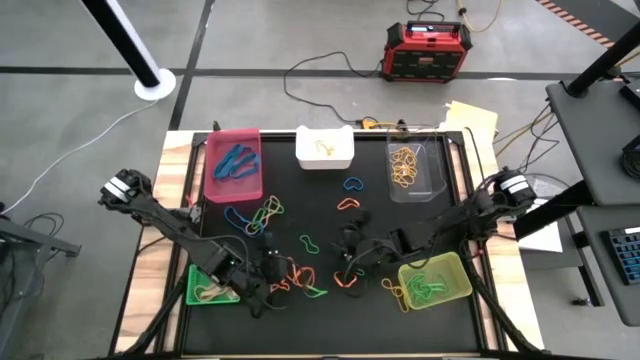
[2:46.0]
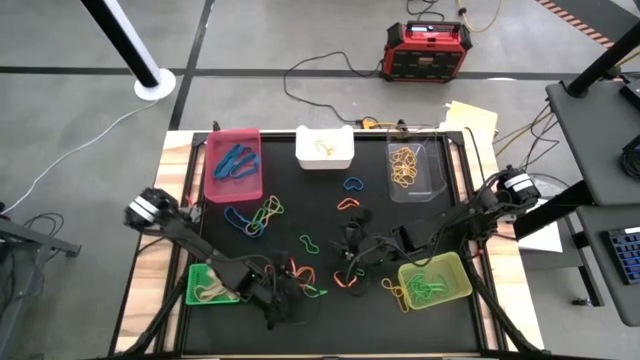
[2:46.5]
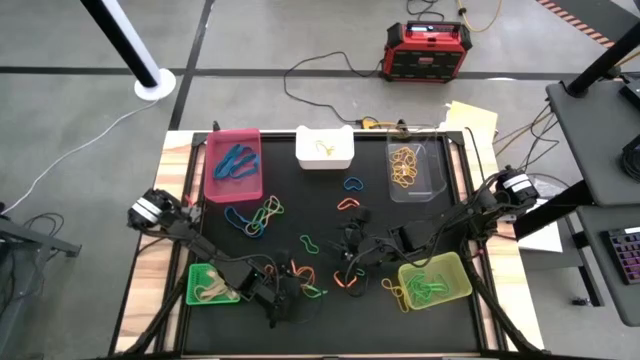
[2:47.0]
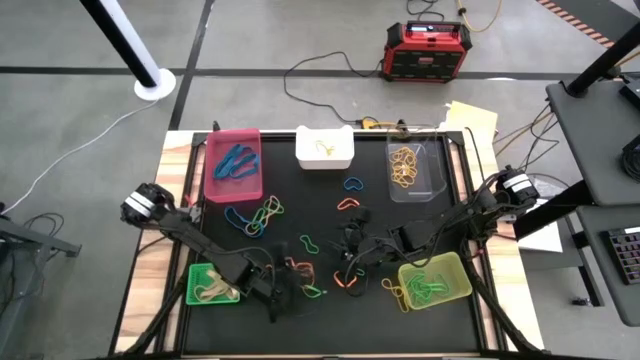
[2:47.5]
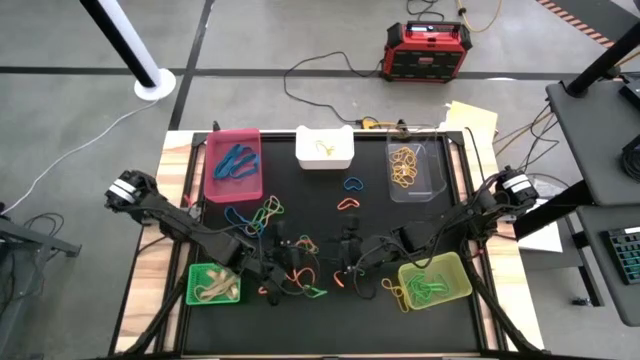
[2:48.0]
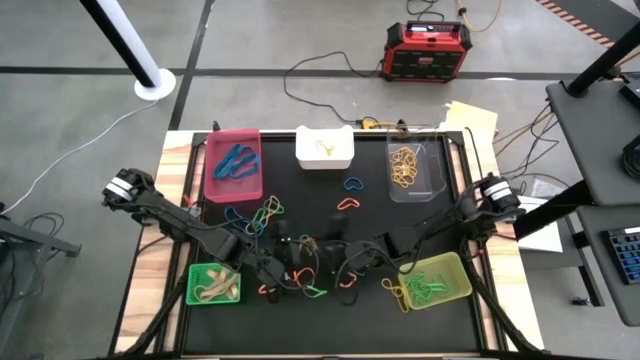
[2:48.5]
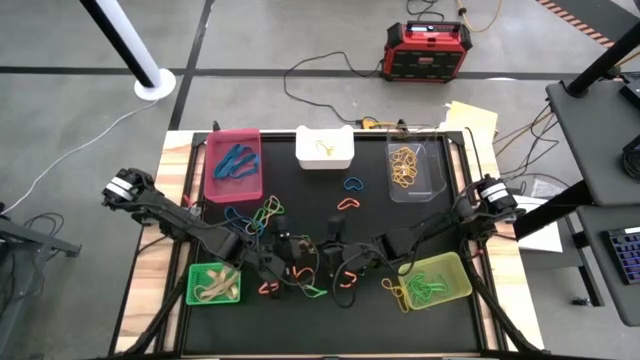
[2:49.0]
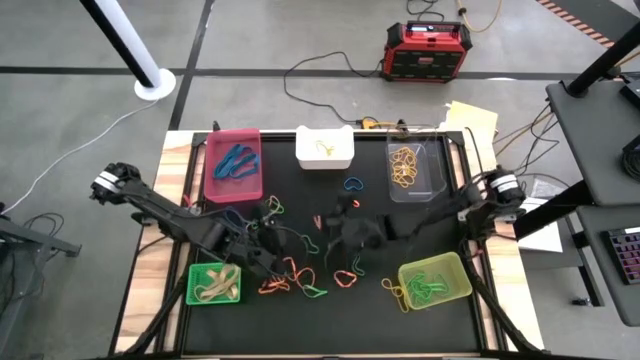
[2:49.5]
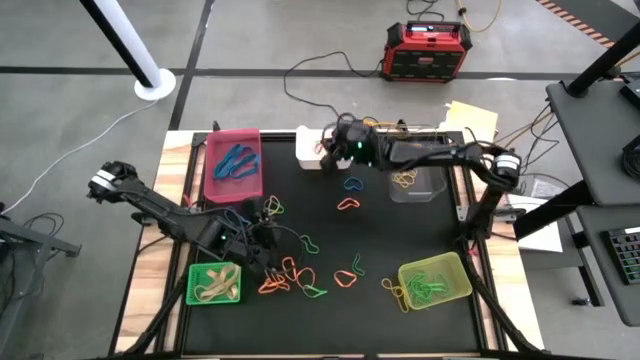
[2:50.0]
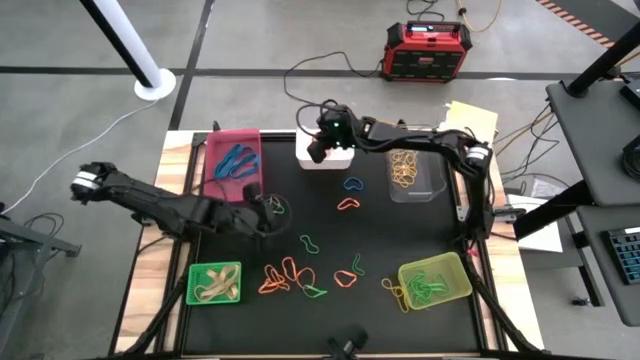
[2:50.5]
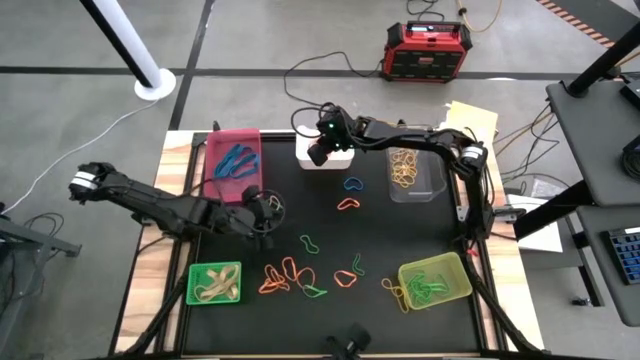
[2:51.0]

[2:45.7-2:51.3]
Task: Sort rubber bands into baskets
Put the orange rubber band into the white bin

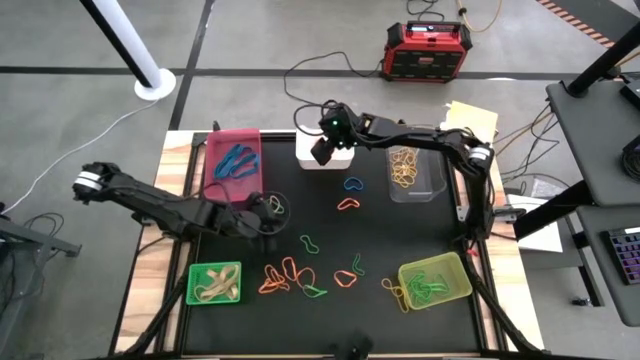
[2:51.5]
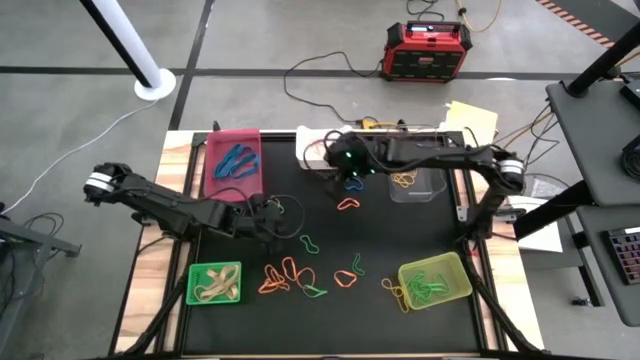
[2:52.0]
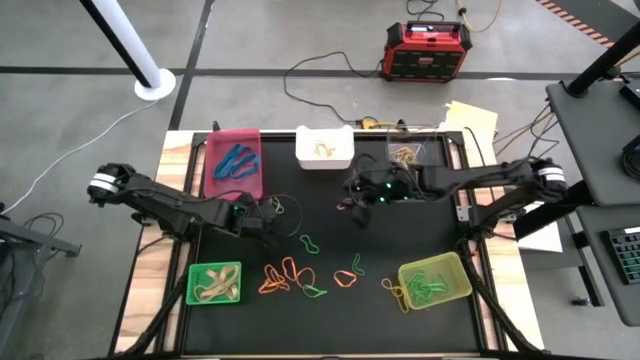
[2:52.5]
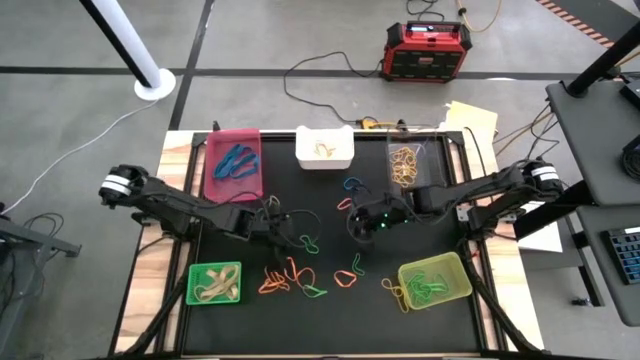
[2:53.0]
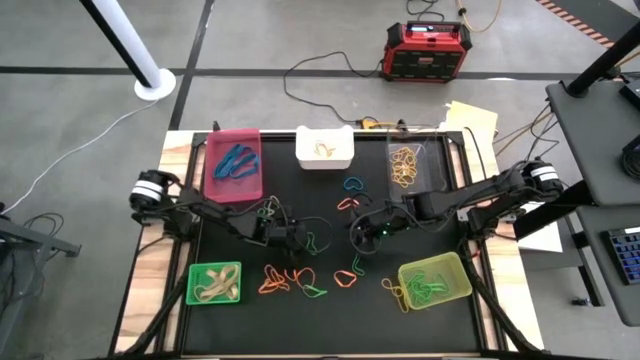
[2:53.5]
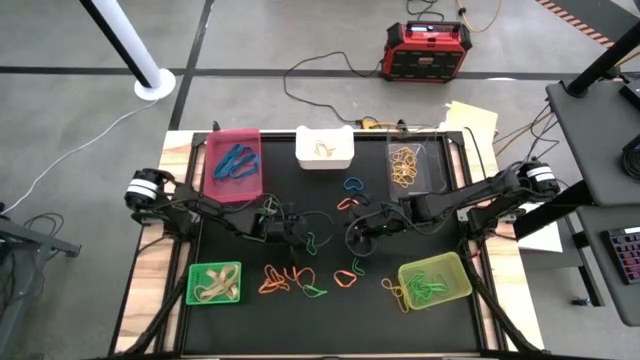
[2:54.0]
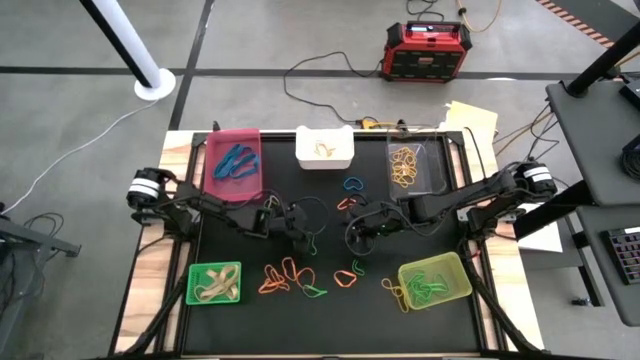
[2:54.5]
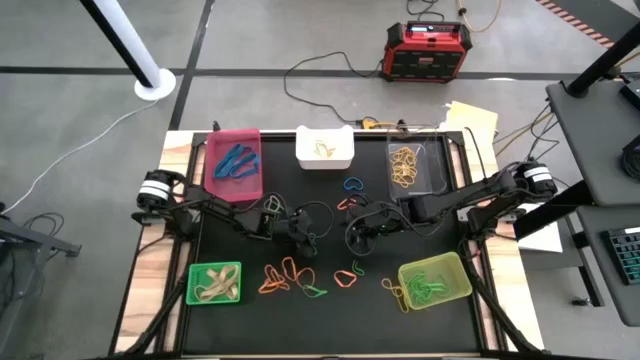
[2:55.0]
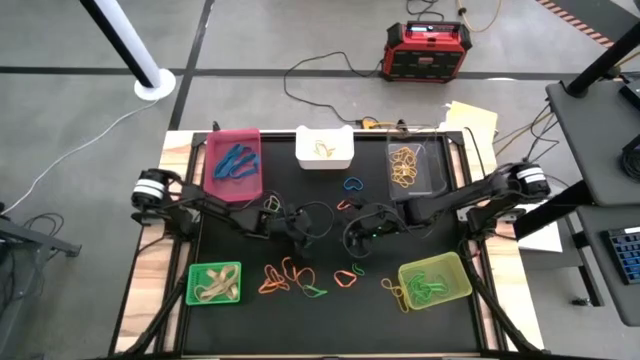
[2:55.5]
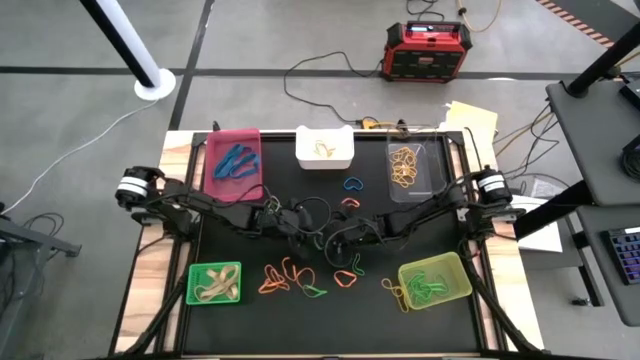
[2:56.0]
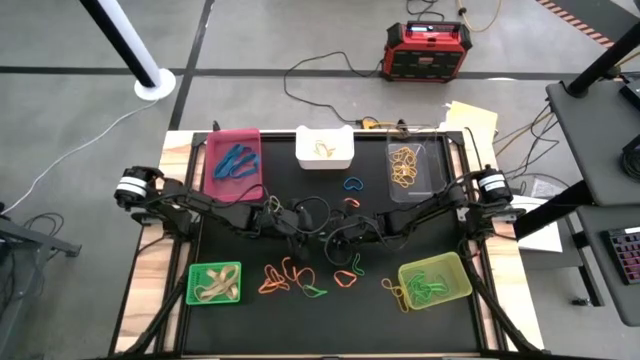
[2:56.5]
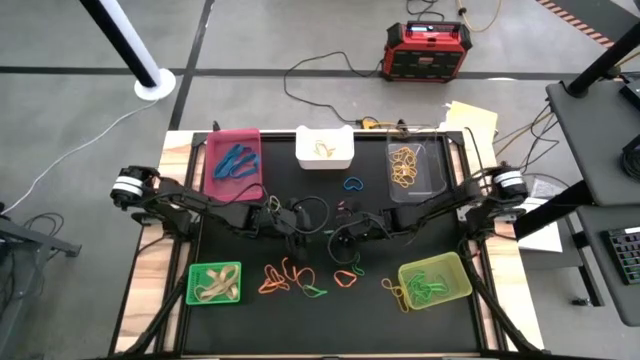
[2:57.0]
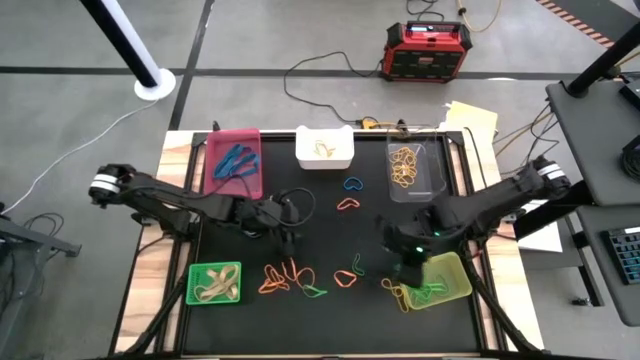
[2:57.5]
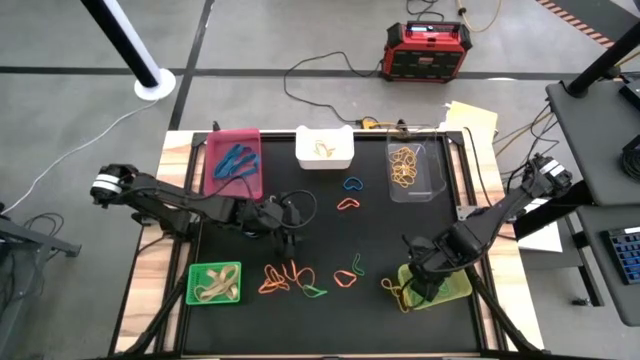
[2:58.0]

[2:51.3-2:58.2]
Put the green rubber band into the yellow bin

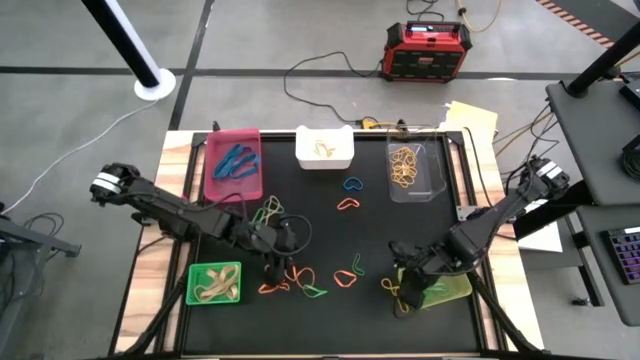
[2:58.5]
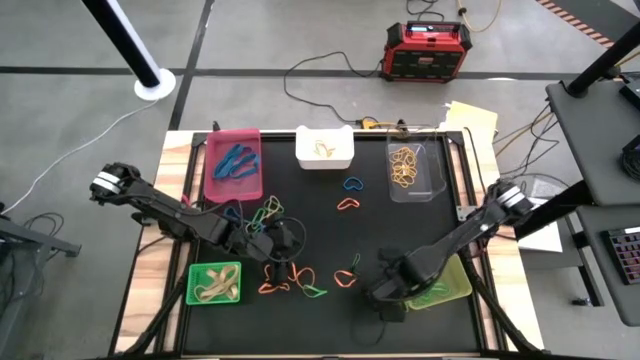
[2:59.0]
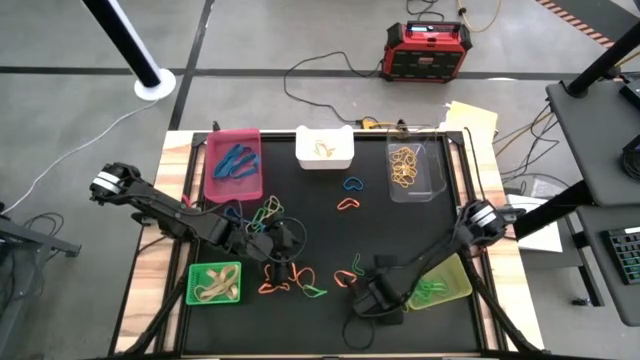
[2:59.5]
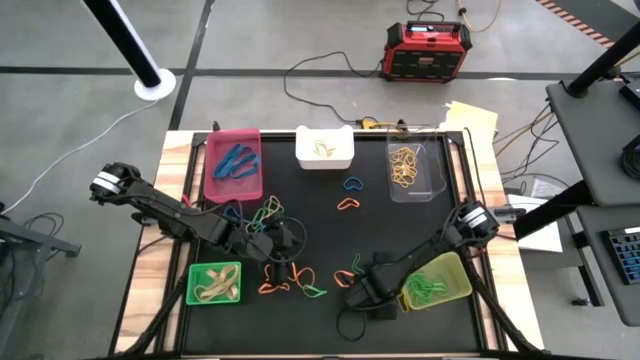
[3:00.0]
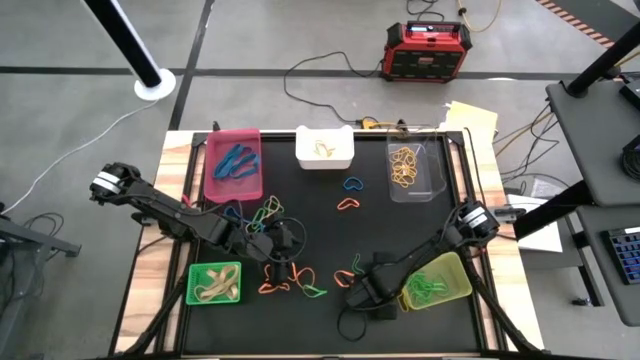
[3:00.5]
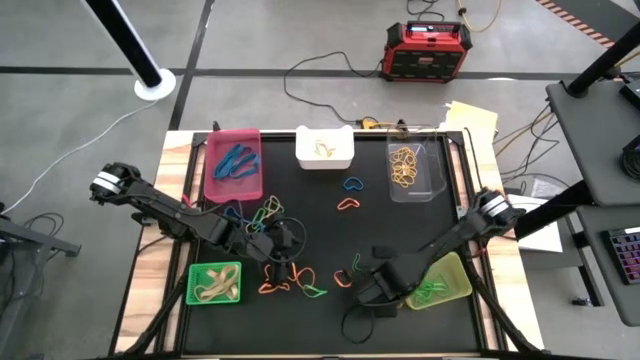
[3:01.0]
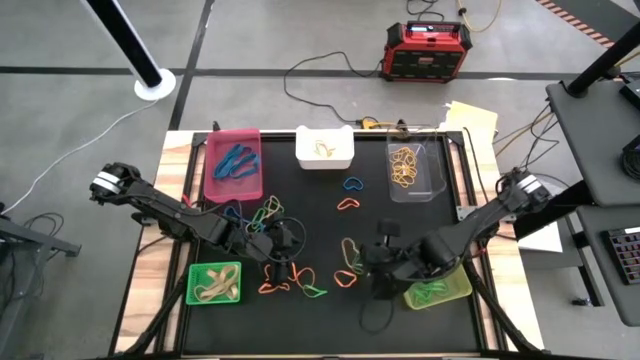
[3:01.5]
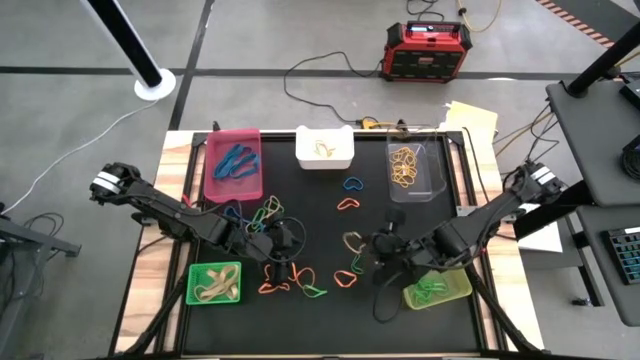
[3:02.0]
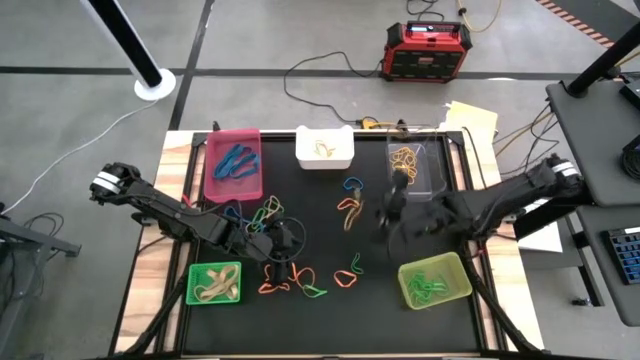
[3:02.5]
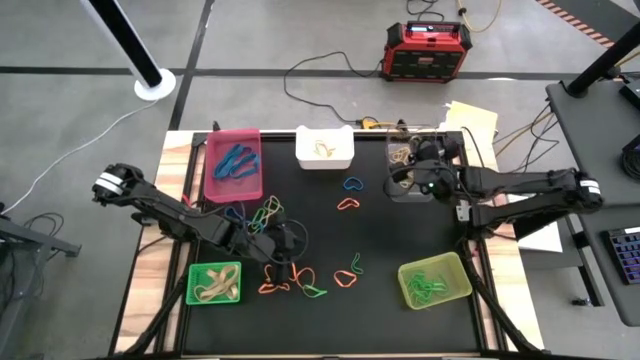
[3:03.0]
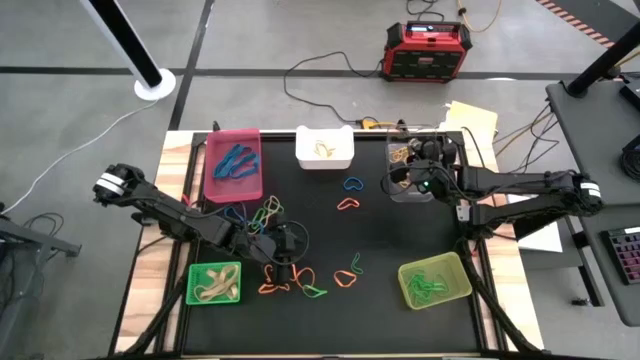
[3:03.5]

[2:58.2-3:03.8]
Put the yellow rubber band into the transparent bin

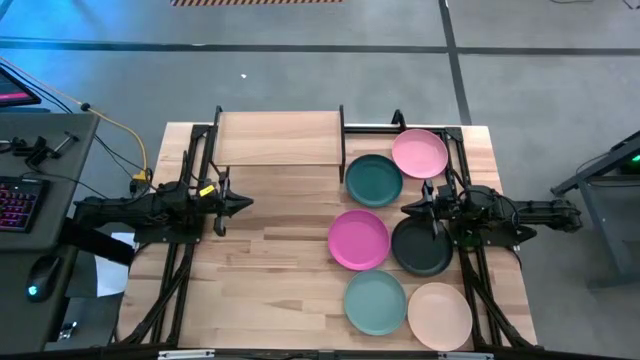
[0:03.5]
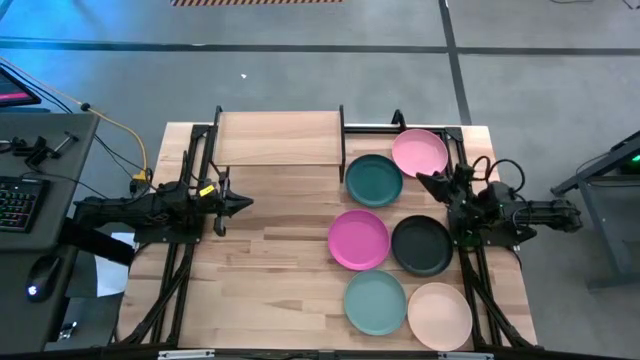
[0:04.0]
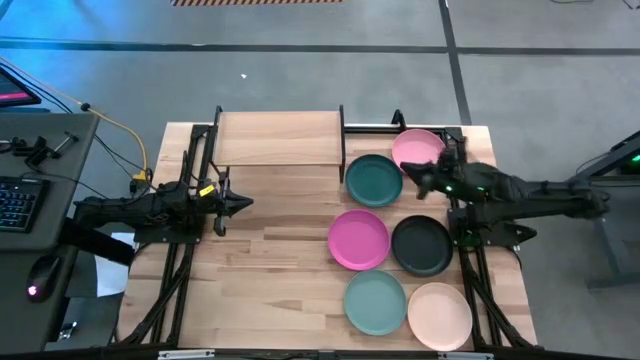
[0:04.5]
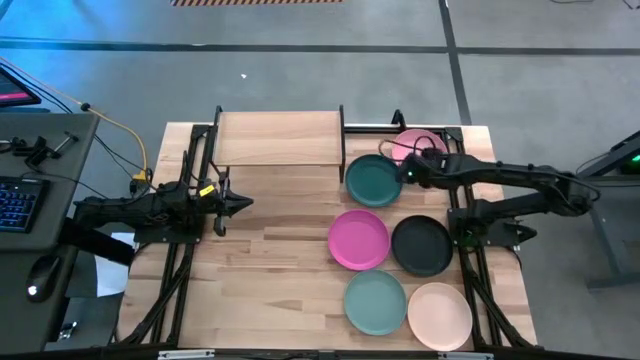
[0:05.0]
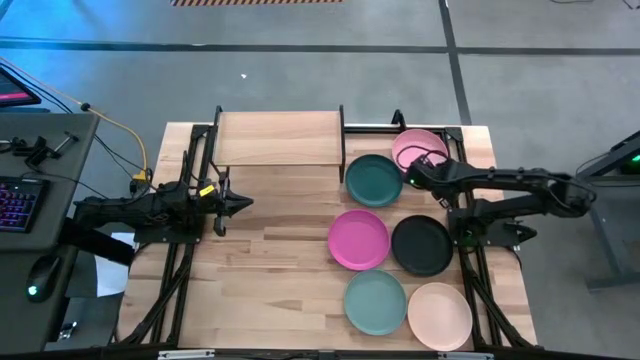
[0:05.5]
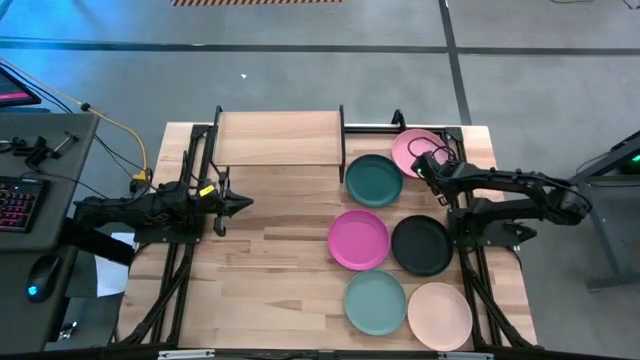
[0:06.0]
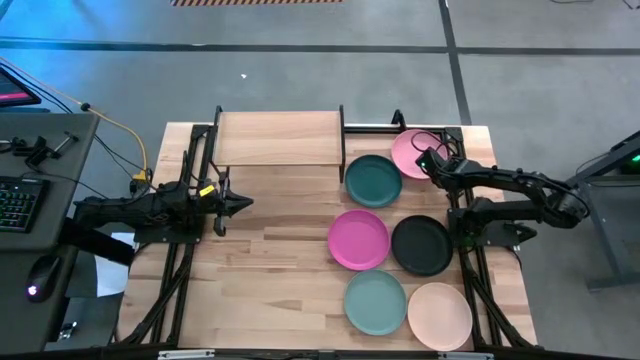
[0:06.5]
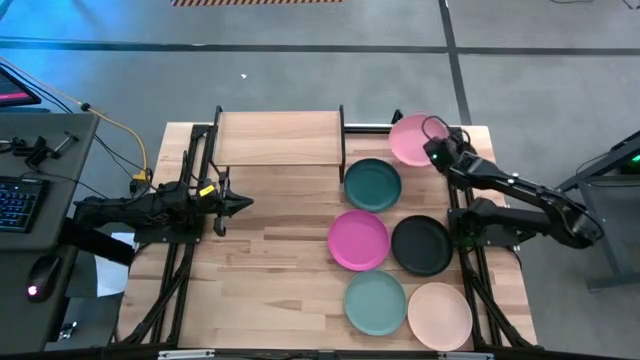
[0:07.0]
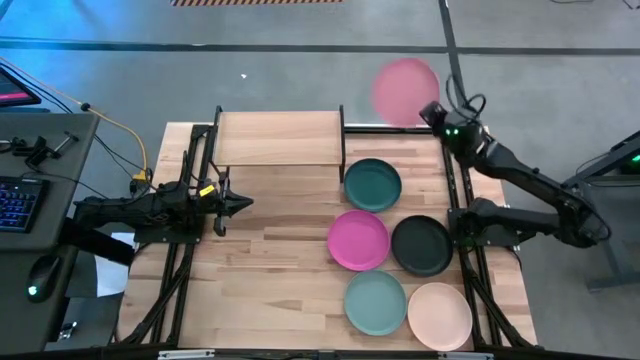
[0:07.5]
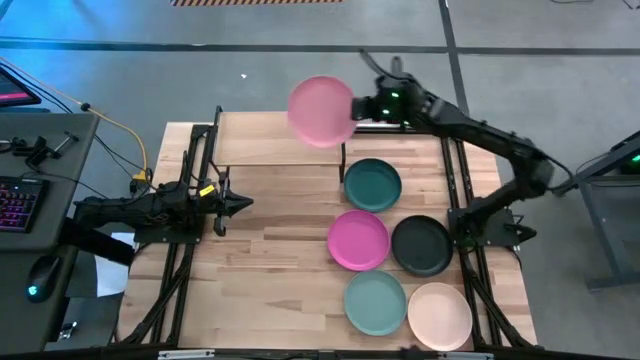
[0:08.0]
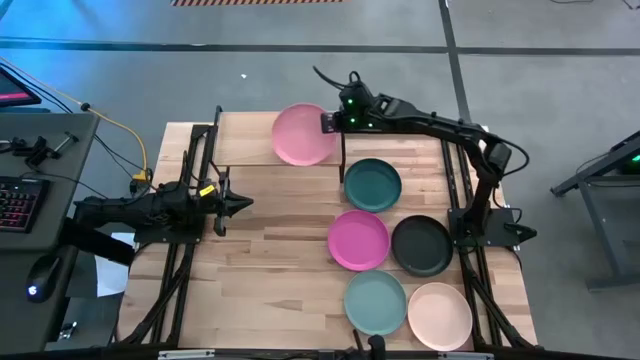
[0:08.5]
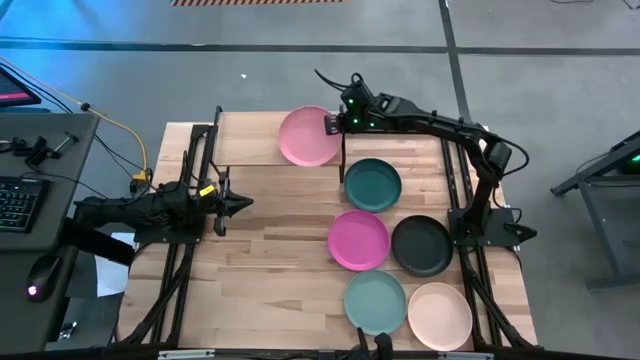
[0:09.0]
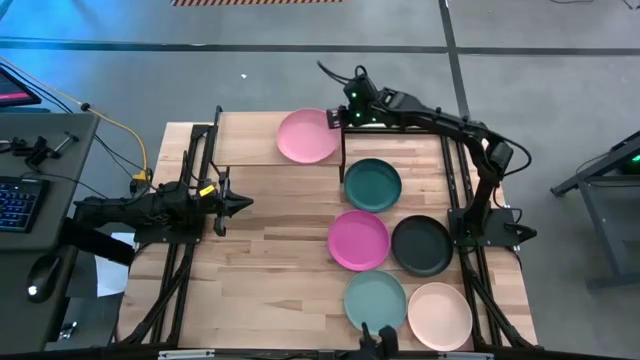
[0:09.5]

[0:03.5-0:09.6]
Task: Place and stack plates onto a shelf
Put the light pink plate on the shelf
